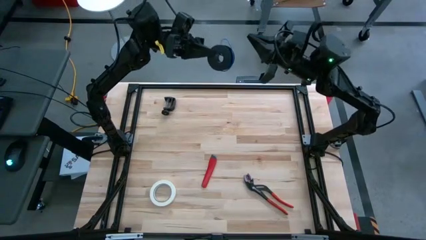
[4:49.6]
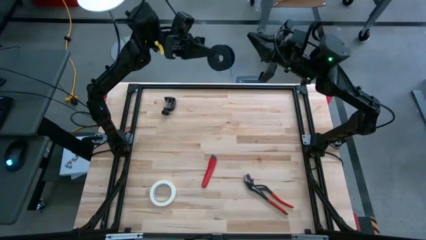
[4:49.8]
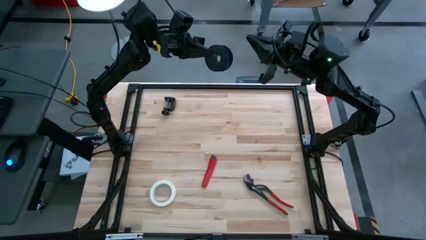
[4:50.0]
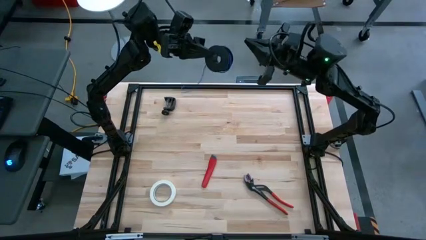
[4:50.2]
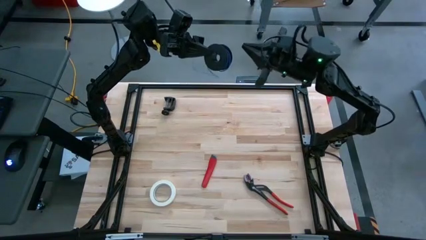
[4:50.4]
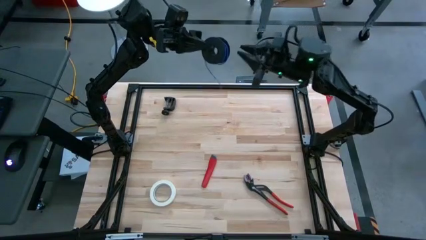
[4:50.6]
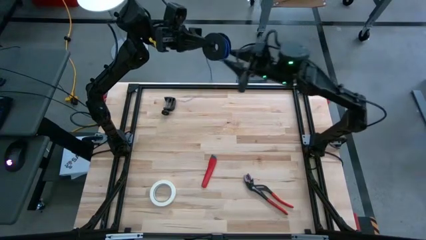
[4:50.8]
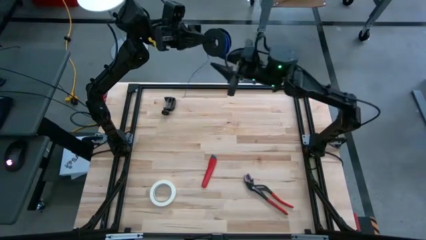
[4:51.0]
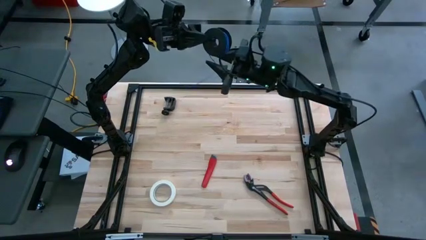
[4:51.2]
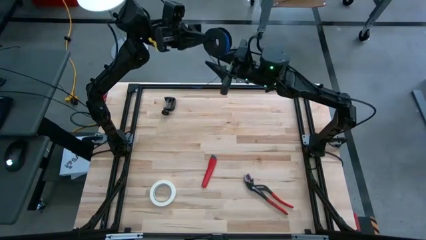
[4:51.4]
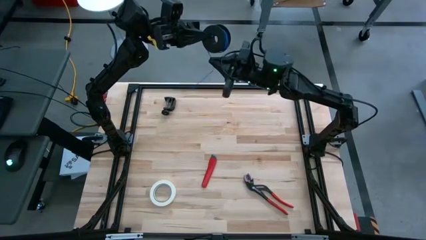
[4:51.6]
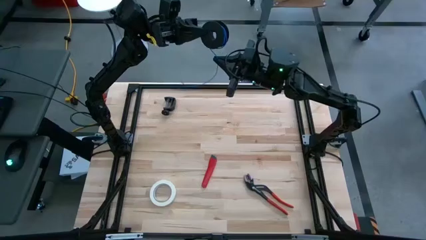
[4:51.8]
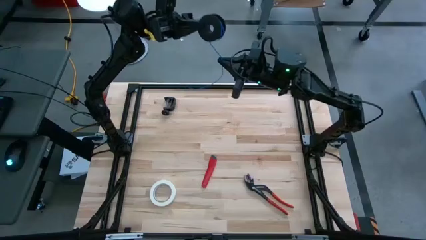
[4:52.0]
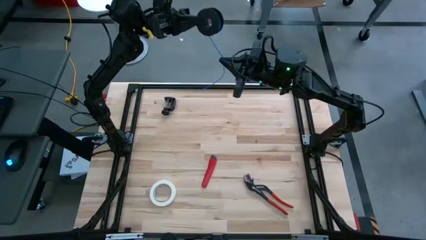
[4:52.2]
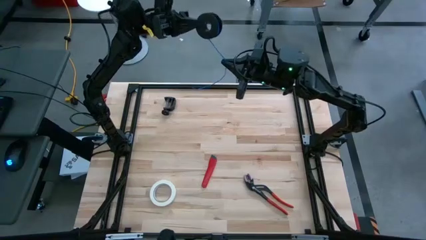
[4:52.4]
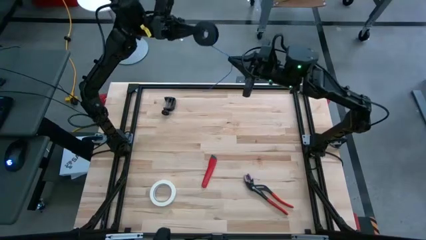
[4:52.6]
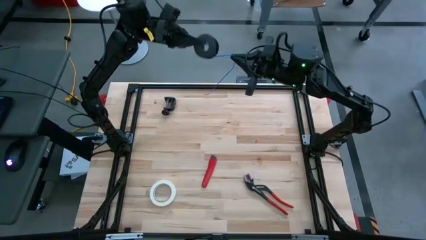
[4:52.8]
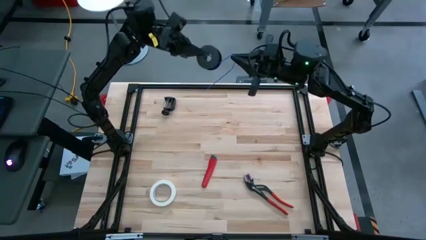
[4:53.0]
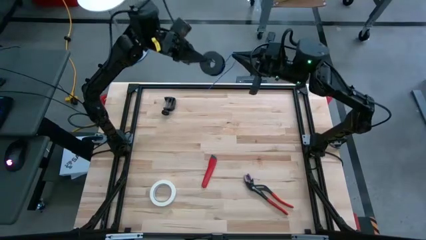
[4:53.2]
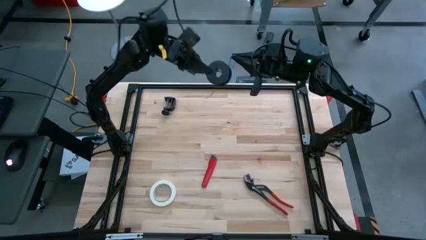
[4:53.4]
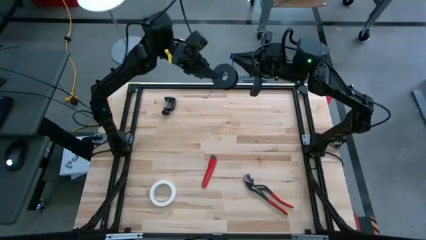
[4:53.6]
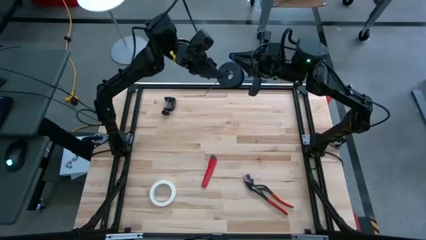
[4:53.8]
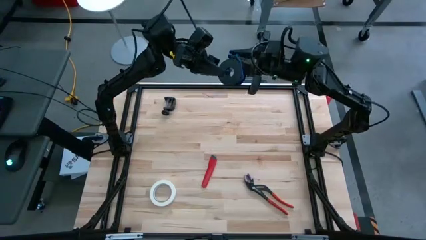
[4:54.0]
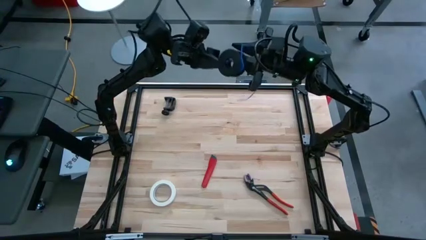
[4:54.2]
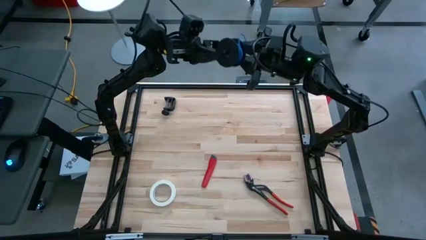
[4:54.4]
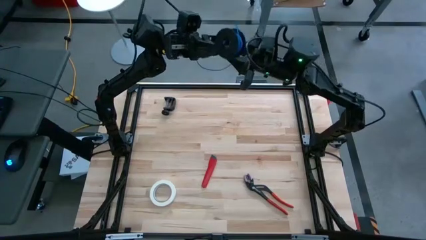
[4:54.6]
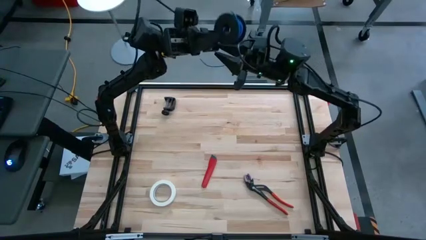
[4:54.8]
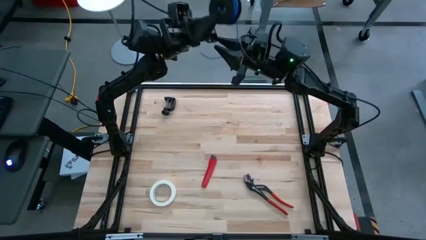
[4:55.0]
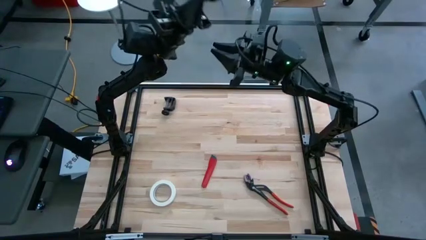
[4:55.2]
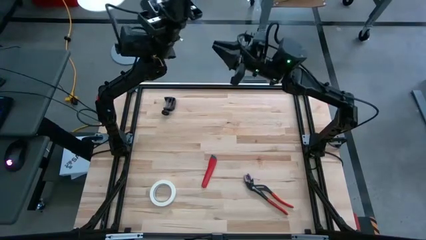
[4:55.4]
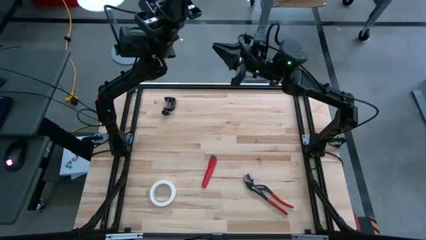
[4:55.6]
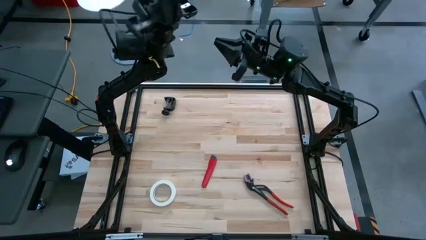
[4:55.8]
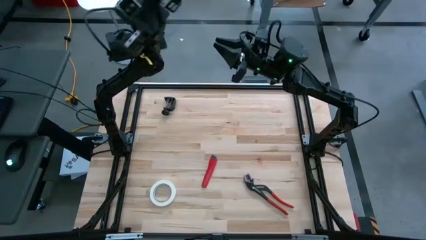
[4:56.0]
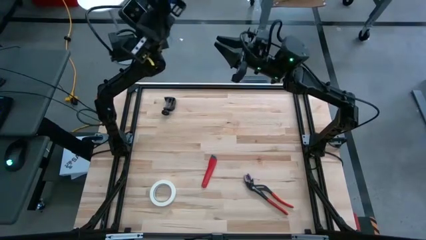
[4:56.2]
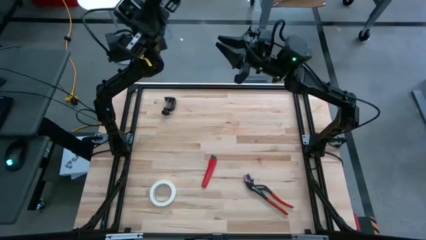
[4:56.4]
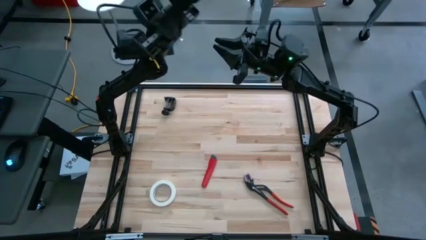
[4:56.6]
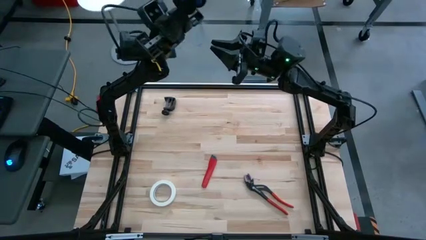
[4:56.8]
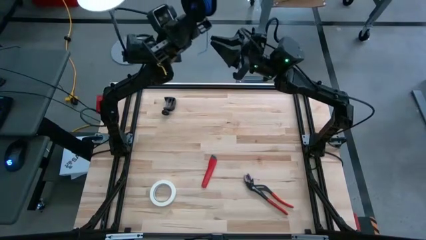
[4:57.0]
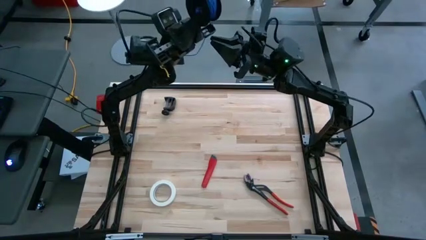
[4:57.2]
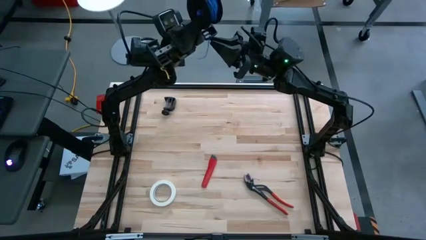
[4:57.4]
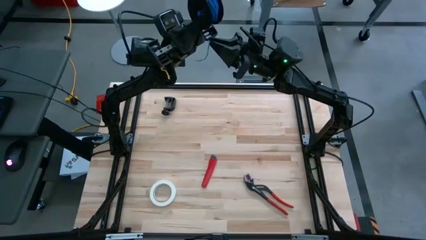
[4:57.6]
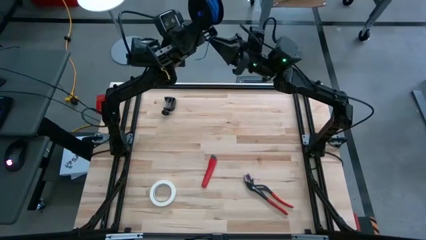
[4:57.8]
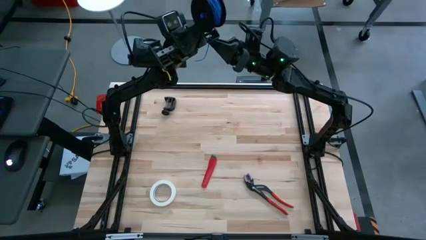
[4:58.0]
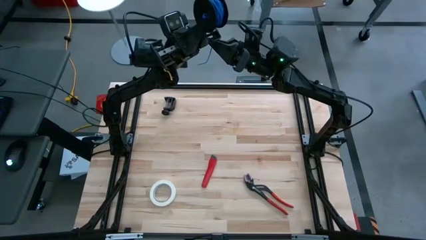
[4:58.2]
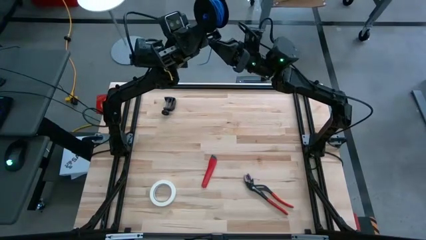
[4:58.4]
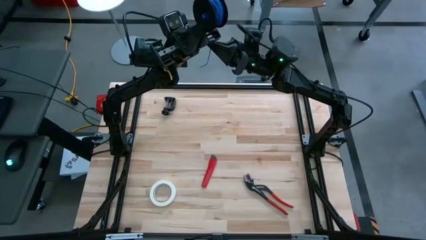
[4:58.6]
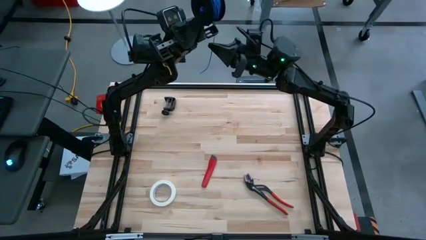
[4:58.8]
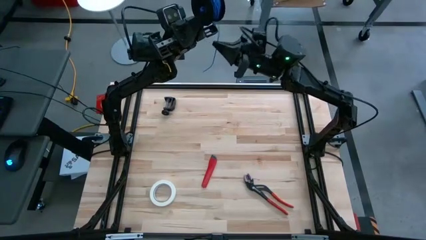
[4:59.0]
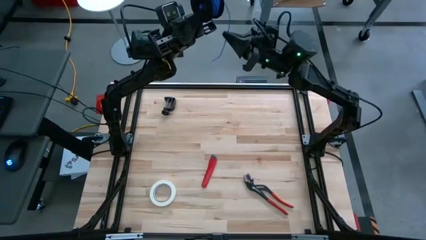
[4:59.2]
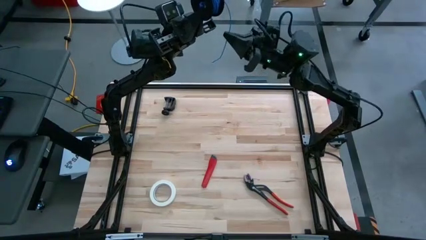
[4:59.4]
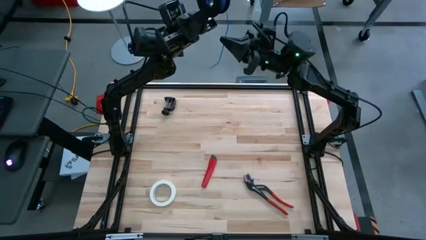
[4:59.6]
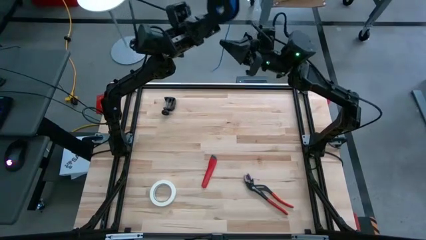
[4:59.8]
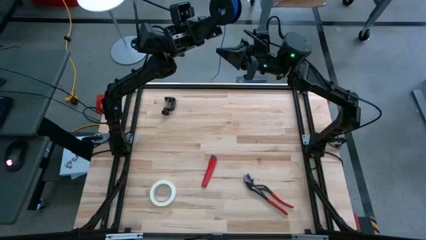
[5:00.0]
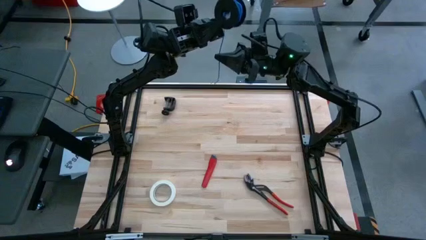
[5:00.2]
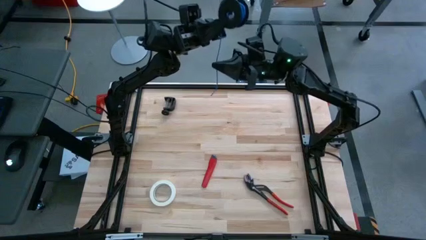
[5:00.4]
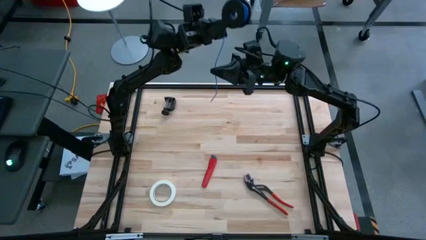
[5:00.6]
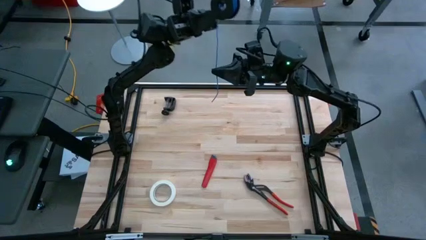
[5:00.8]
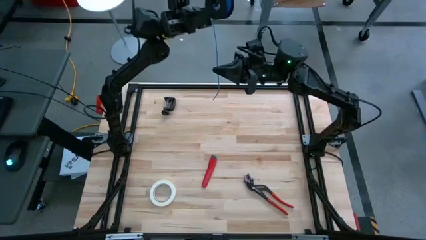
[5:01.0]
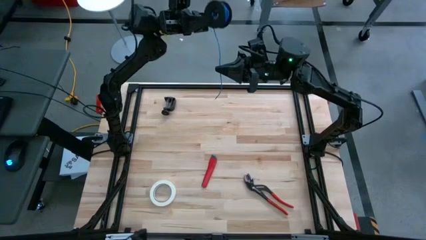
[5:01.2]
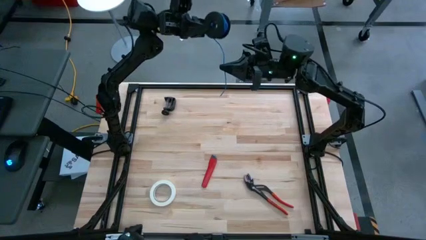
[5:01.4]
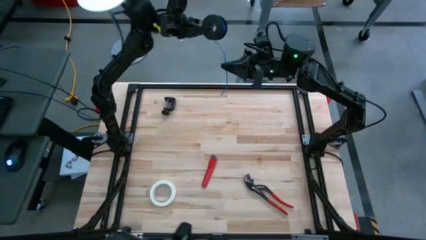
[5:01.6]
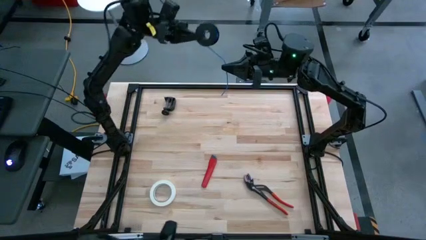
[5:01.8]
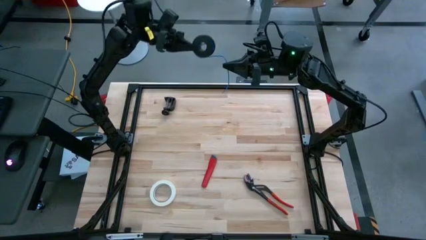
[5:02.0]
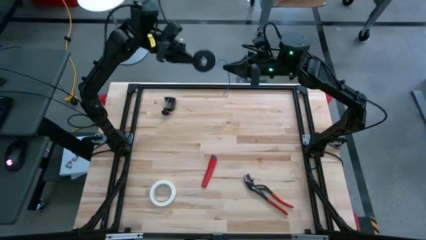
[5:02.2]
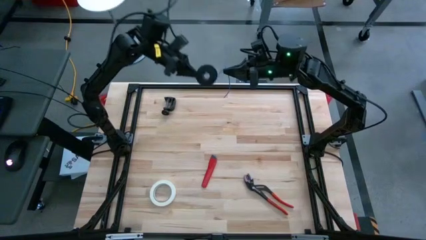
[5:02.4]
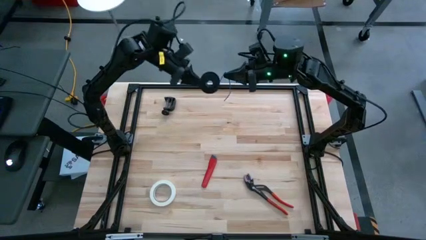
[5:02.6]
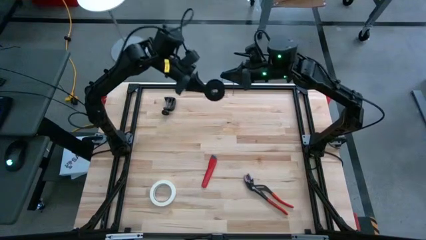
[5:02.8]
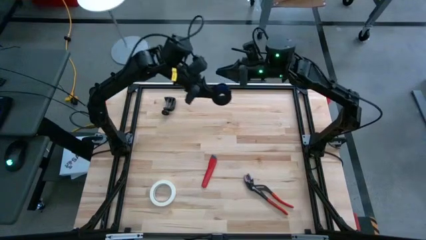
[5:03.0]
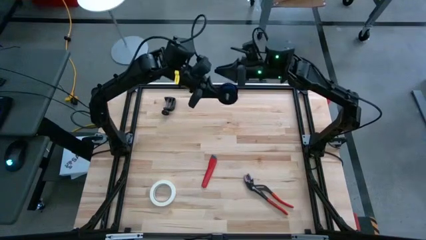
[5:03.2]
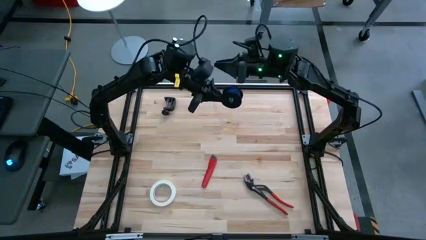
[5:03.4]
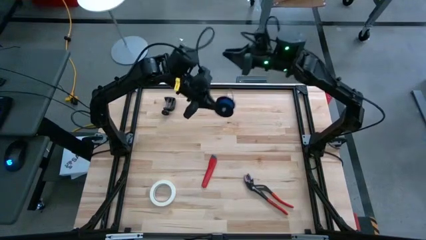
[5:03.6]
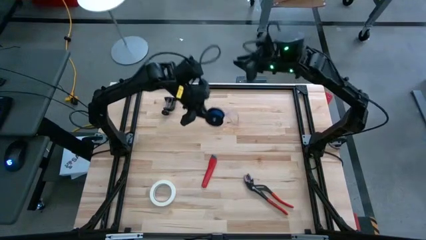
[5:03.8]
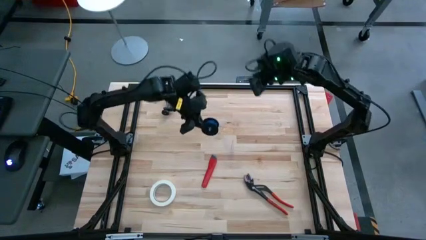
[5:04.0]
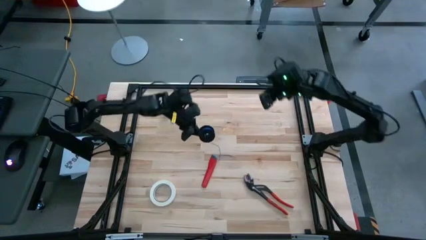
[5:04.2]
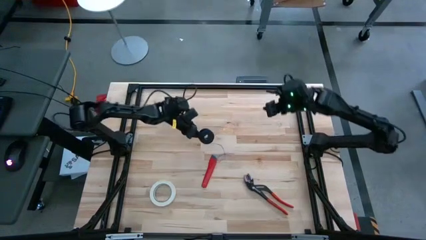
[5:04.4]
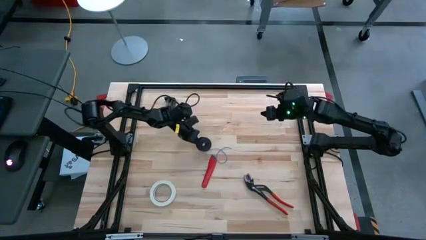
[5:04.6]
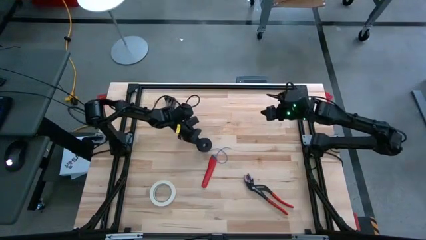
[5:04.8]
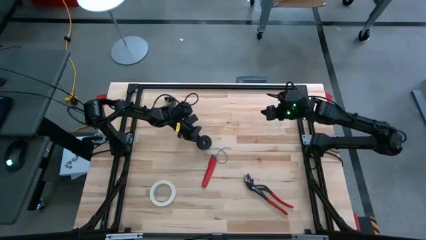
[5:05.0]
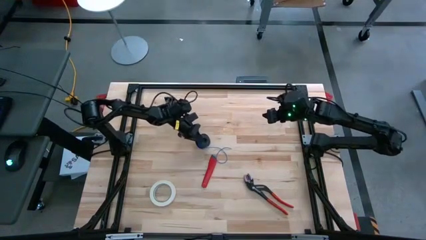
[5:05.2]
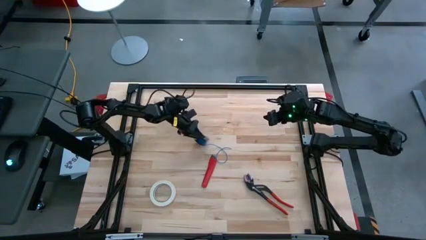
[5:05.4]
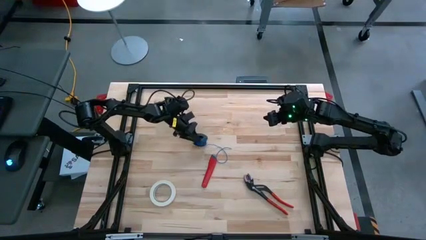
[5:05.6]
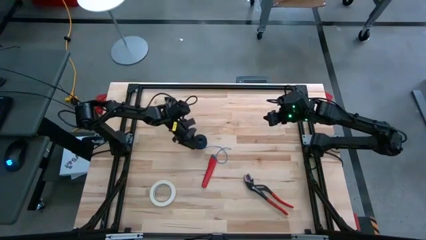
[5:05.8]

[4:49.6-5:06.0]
Task: Coil cords
Coil the blue wire cable onto the black spool
